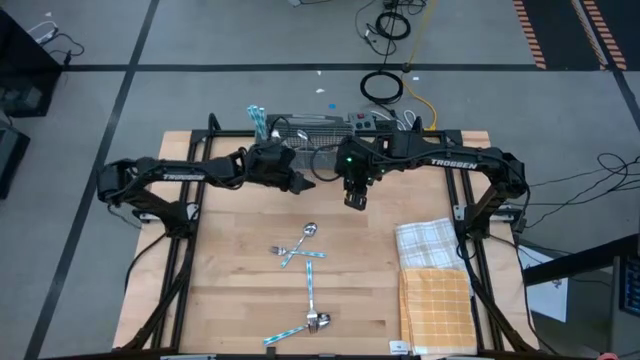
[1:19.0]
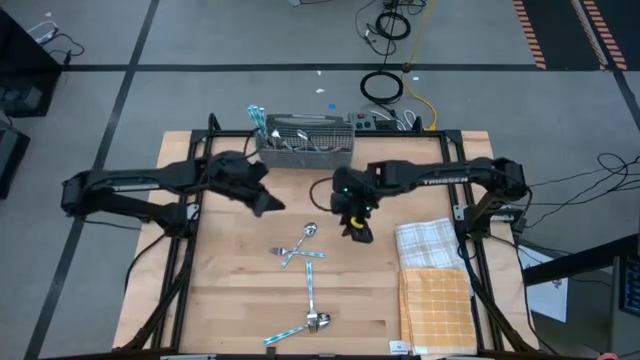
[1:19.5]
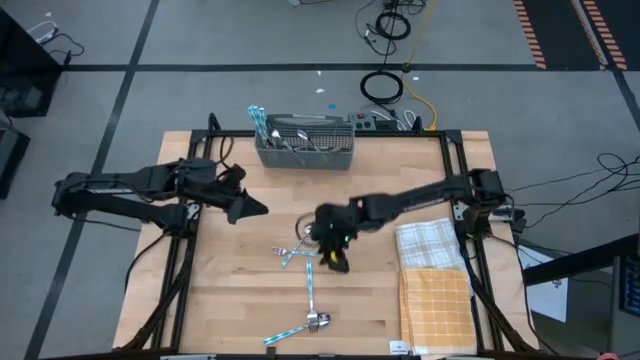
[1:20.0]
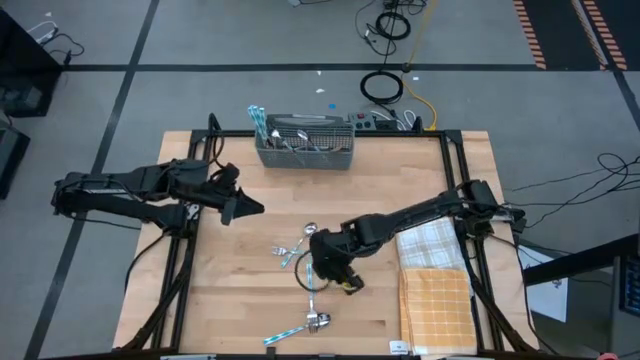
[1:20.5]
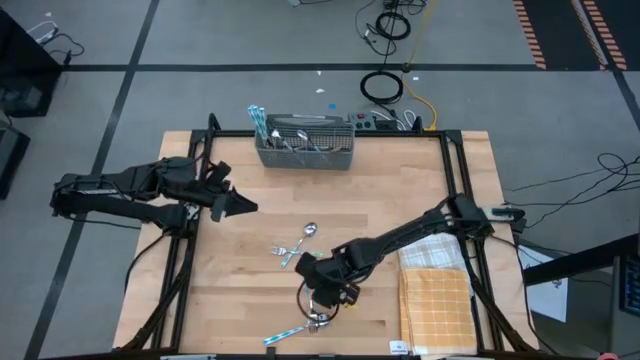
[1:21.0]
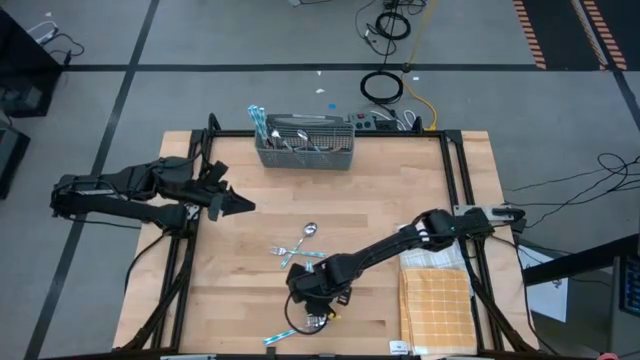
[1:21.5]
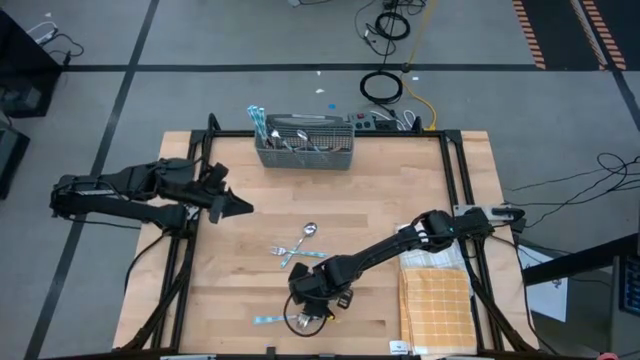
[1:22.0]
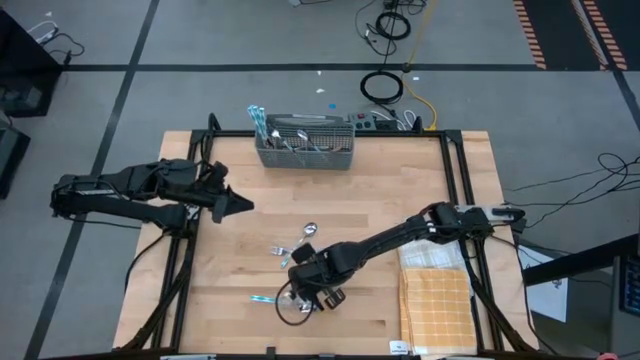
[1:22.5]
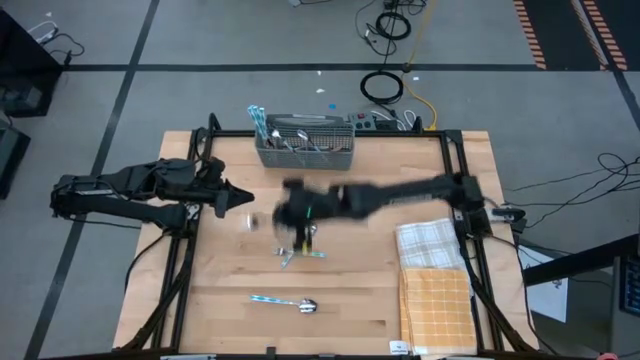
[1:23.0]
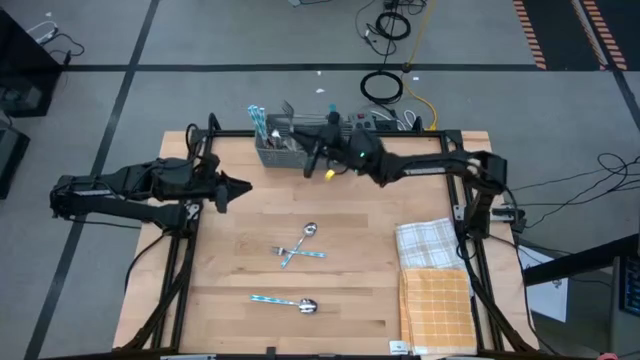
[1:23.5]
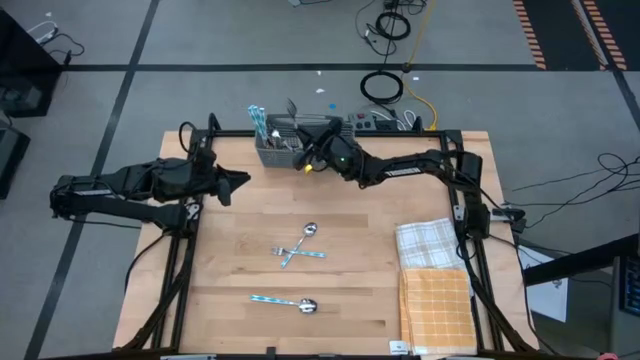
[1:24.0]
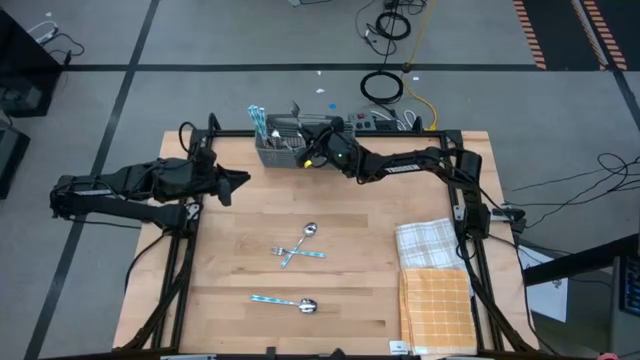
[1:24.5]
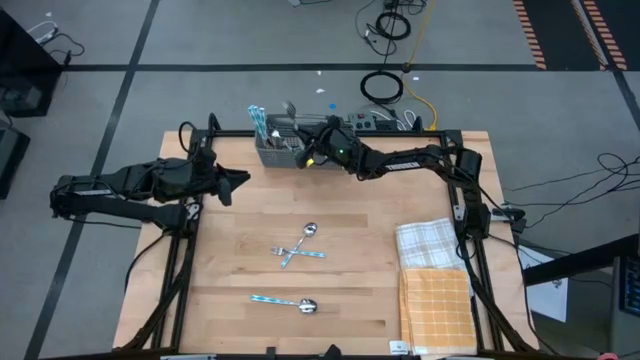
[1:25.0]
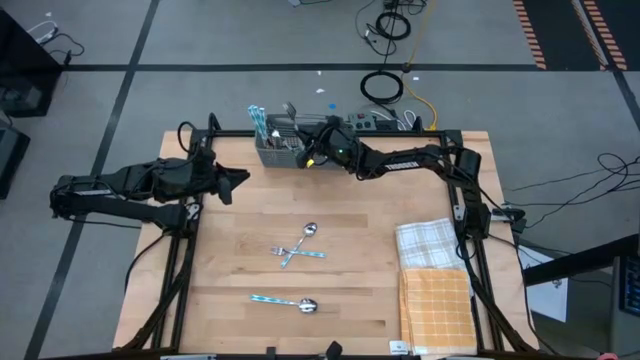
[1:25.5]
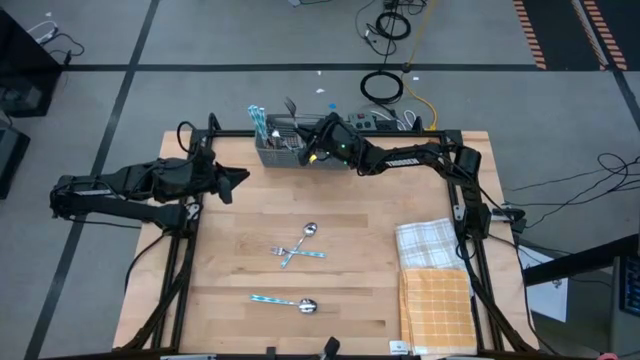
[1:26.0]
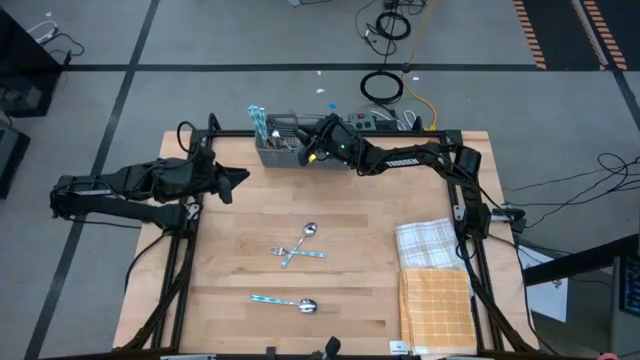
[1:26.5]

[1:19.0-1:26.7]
Task: Sort silverware
Put the bottom fork into the middle left section of the utensil holder

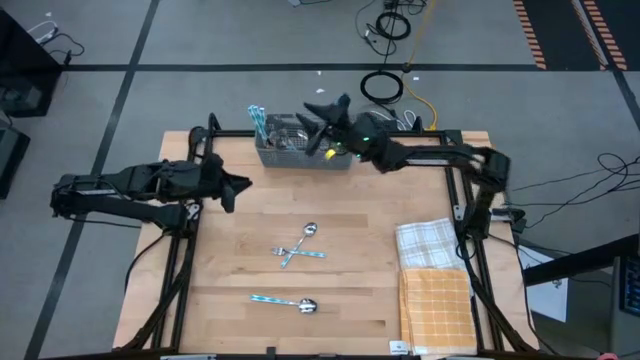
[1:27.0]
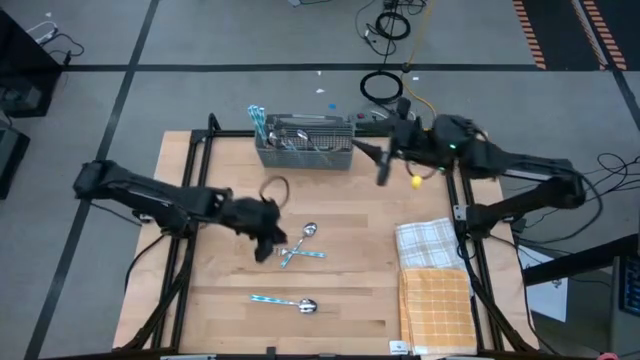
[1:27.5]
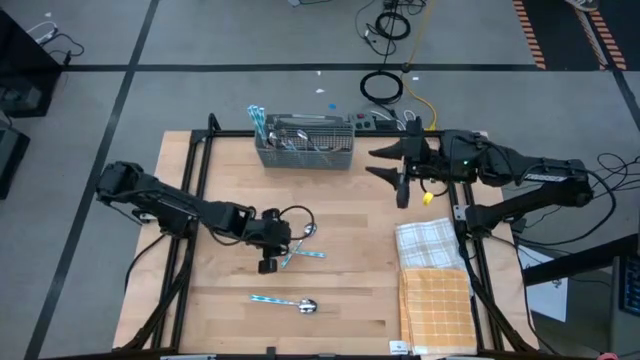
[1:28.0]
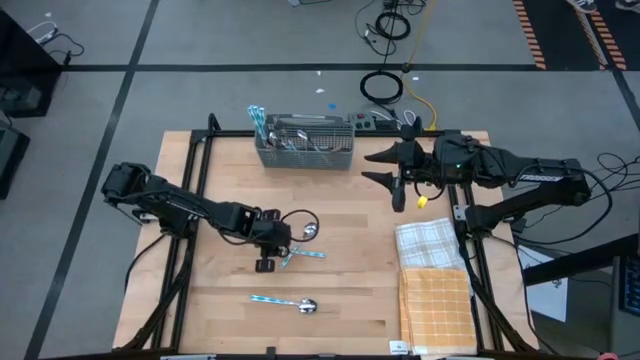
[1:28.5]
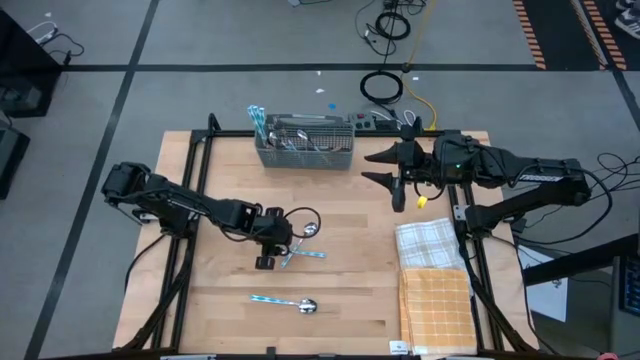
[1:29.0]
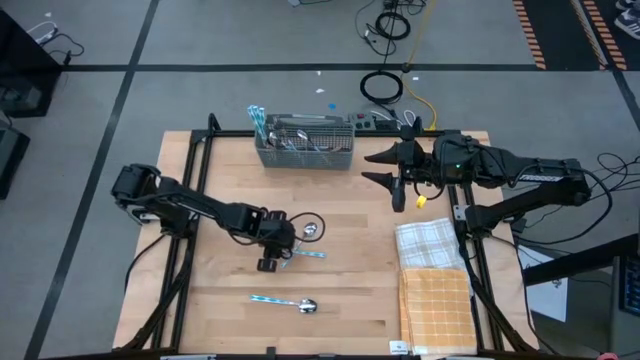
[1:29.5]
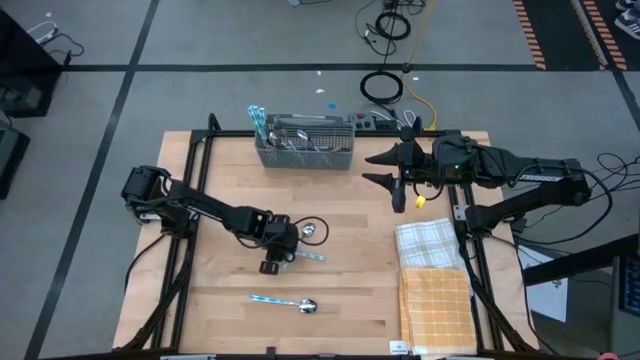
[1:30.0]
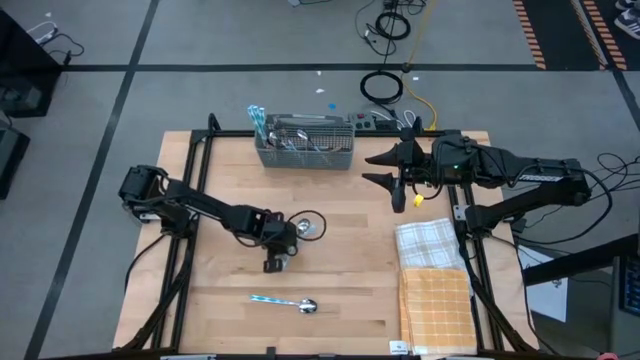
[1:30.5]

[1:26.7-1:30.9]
Put the fork into the middle left section of the utensil holder

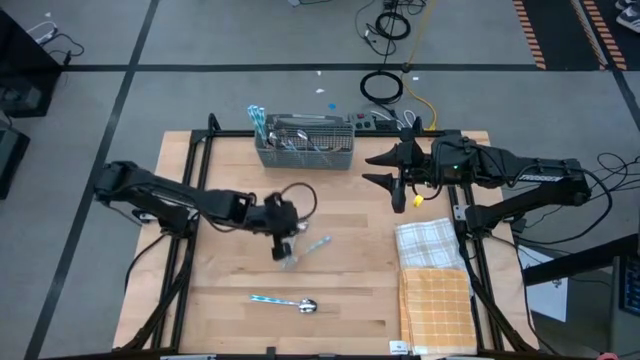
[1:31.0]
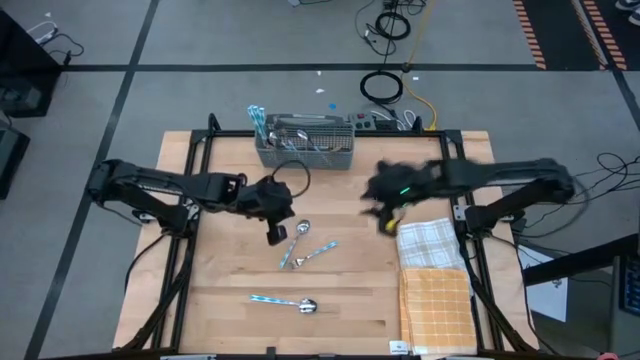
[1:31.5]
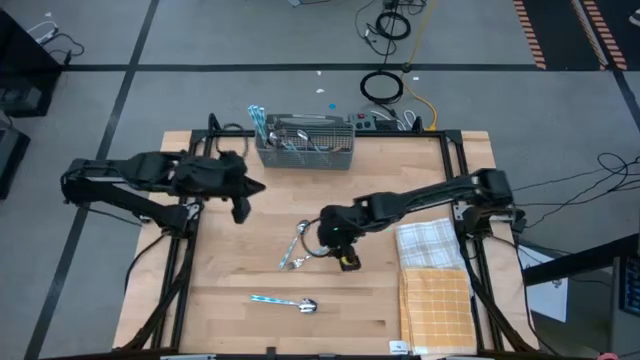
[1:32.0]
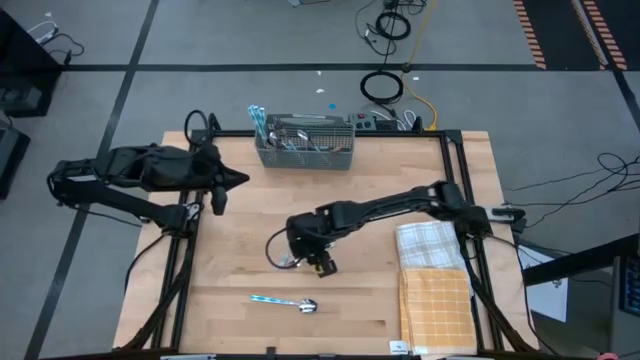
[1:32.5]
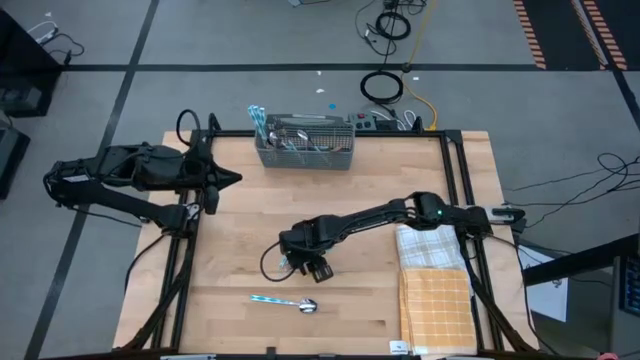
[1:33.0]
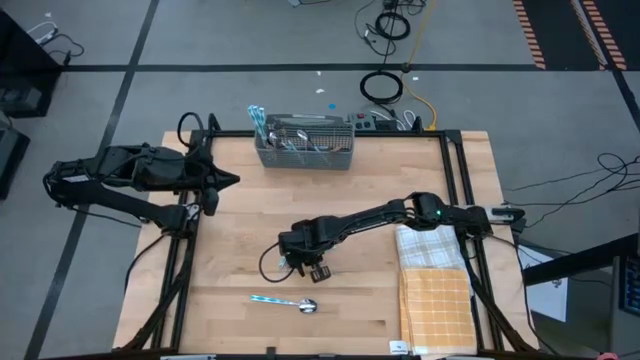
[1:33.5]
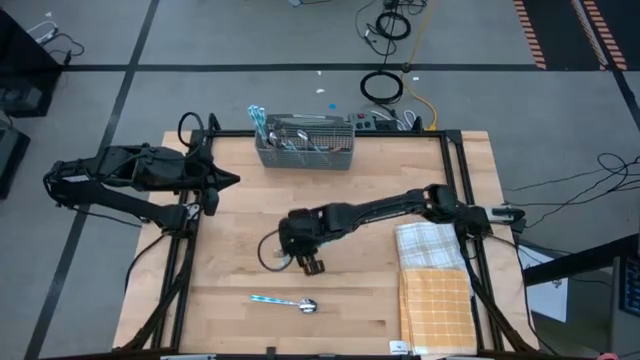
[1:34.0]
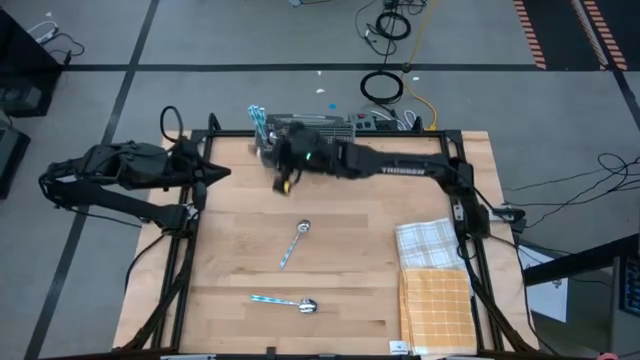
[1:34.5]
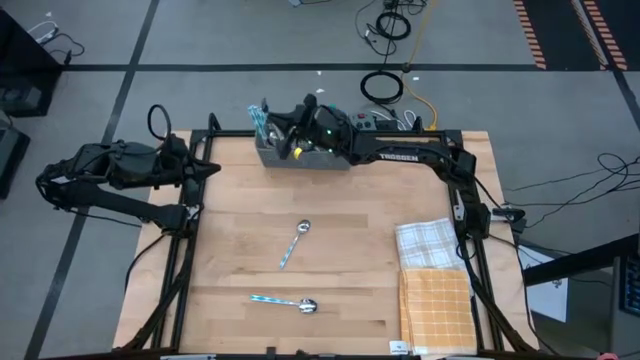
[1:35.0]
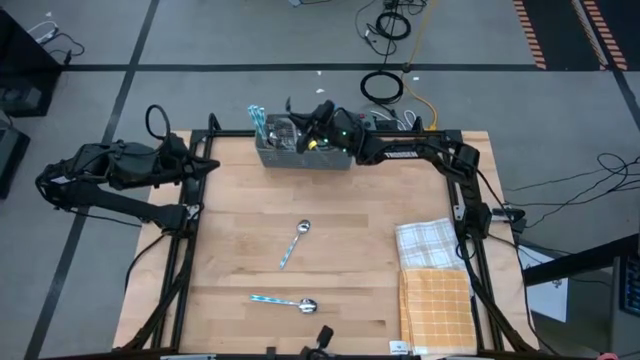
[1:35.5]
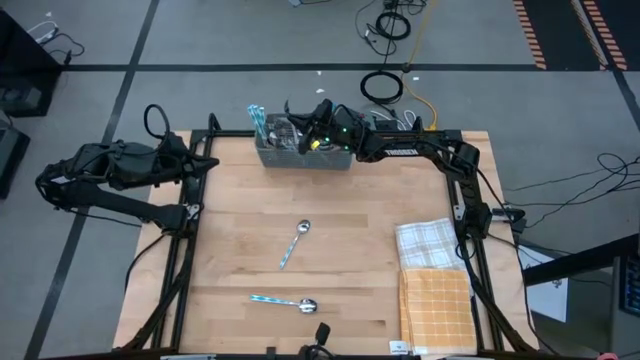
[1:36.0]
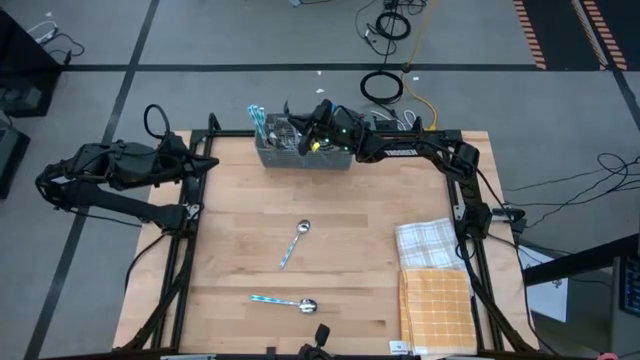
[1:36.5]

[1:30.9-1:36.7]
Put the fork into the middle left section of the utensil holder

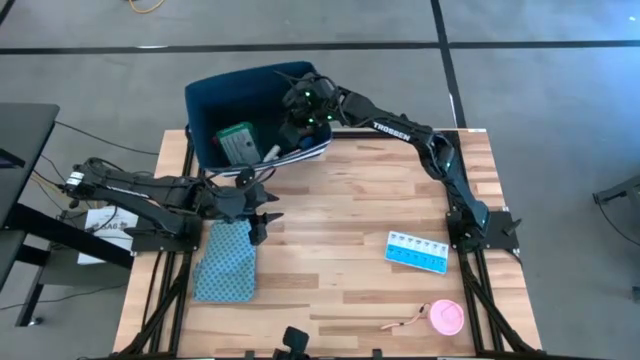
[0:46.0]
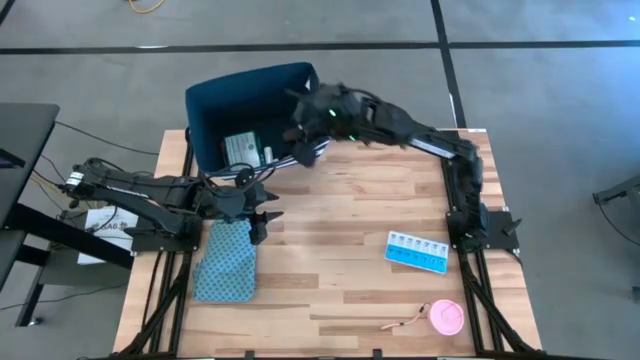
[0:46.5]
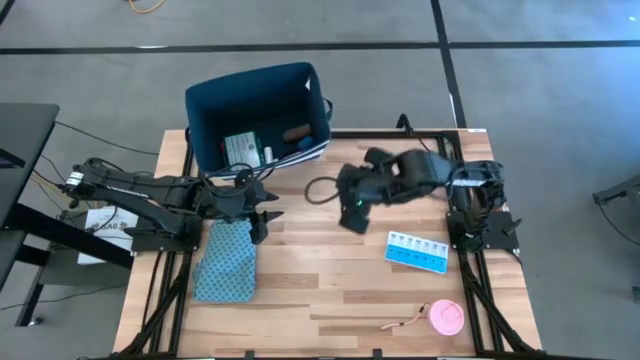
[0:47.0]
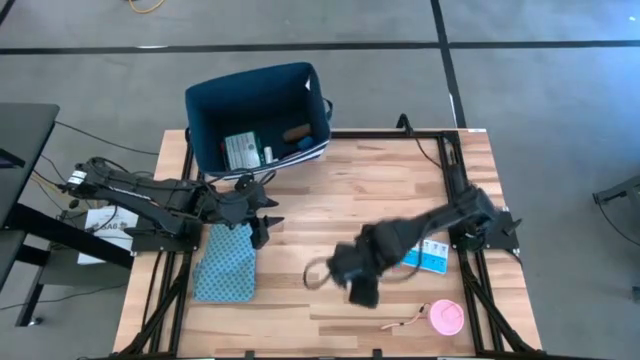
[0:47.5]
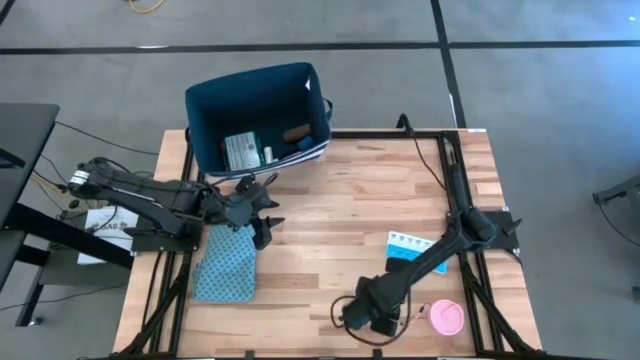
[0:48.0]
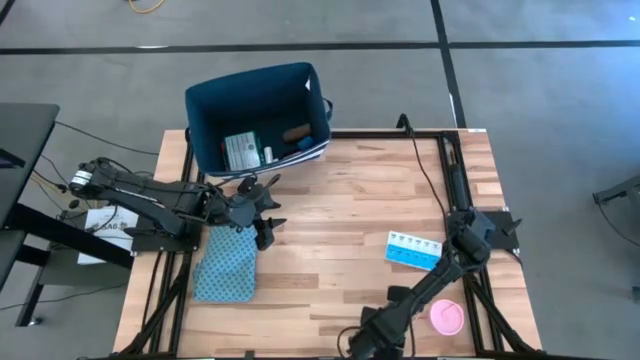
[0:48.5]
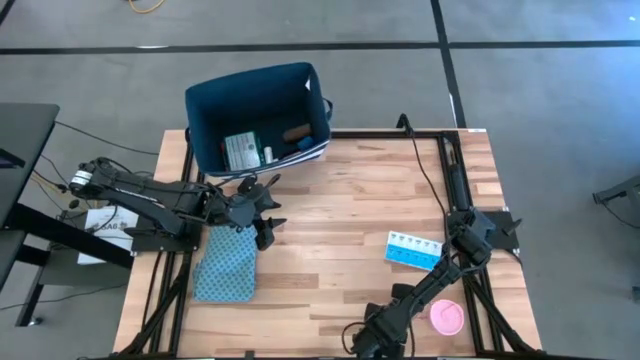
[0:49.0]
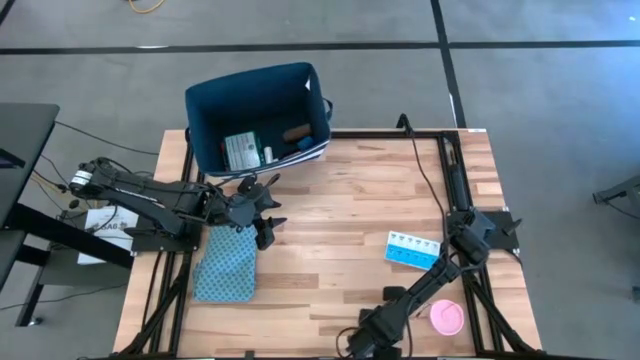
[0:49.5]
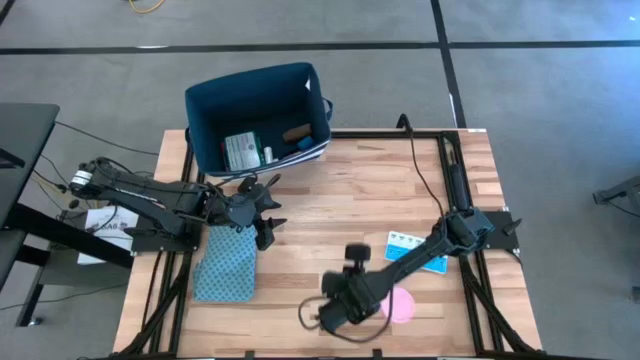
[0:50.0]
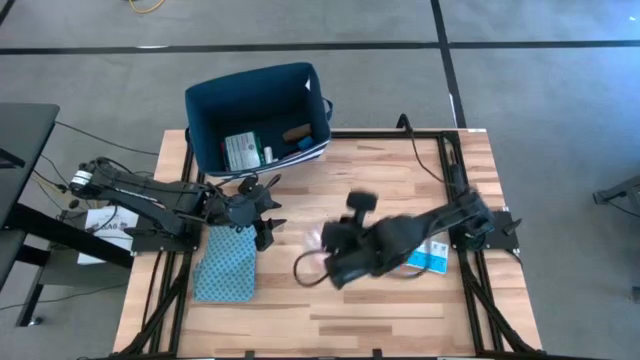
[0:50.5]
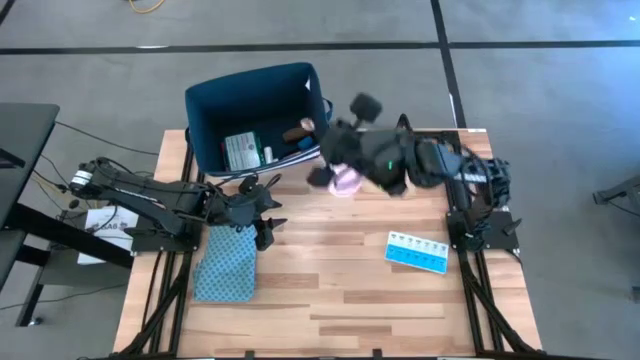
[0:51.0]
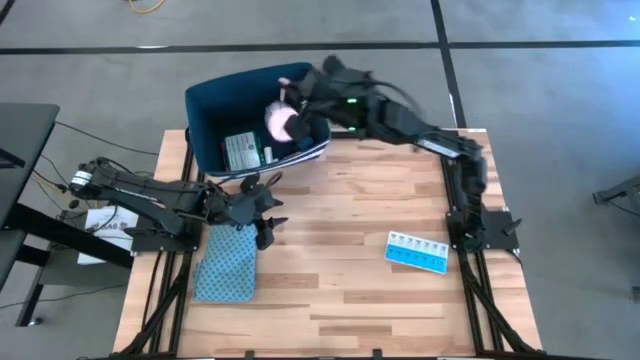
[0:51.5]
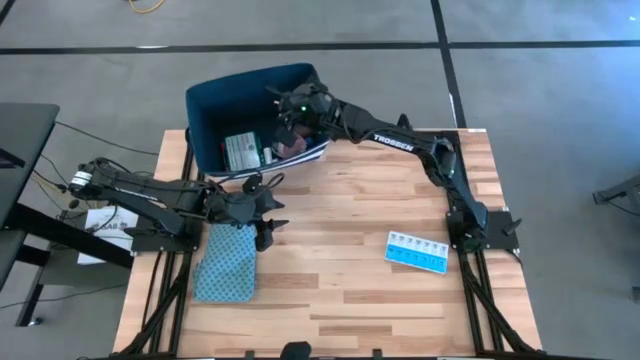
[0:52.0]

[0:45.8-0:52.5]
Task: Pick & place medical supplies in basket/bin
Put the pill dispenser into the blue bin
